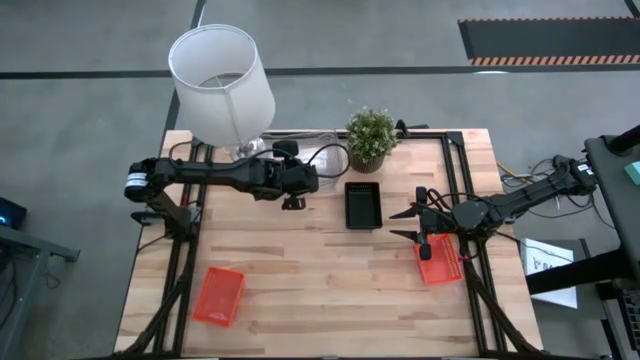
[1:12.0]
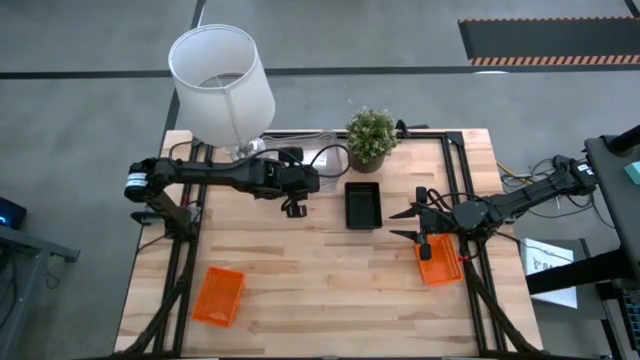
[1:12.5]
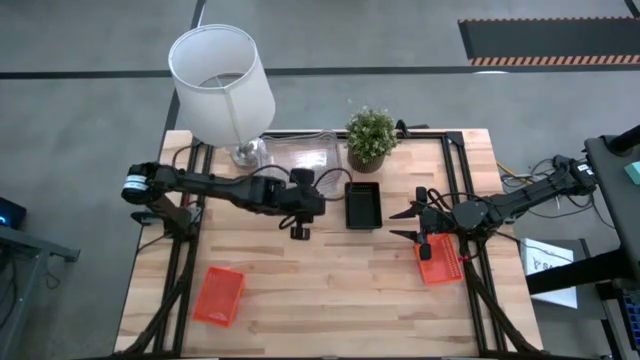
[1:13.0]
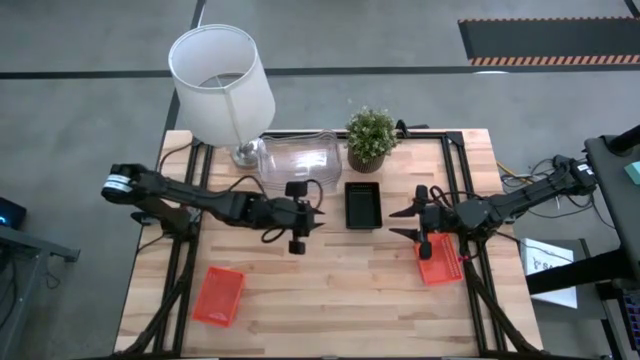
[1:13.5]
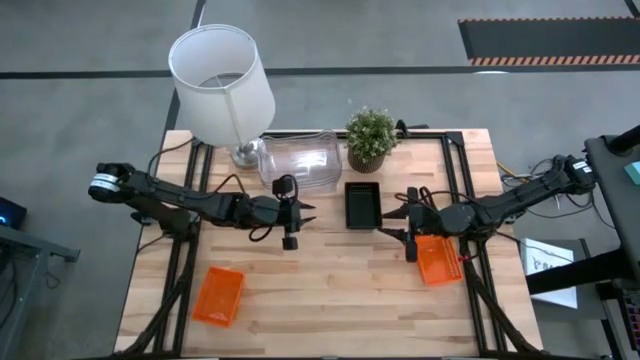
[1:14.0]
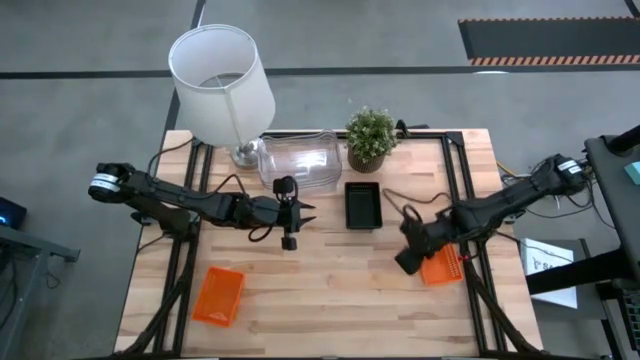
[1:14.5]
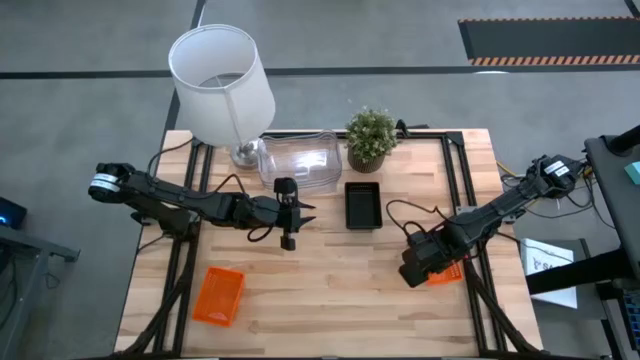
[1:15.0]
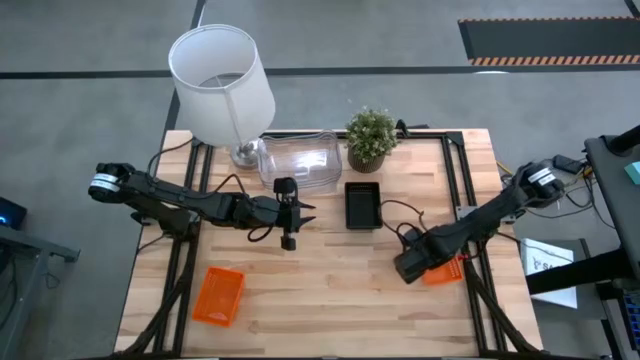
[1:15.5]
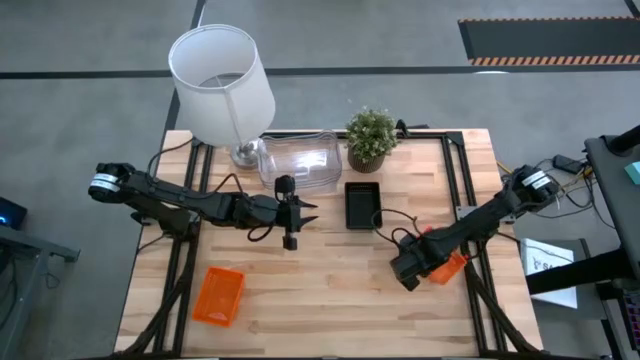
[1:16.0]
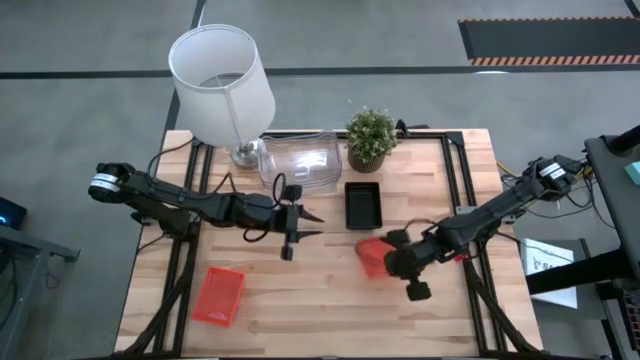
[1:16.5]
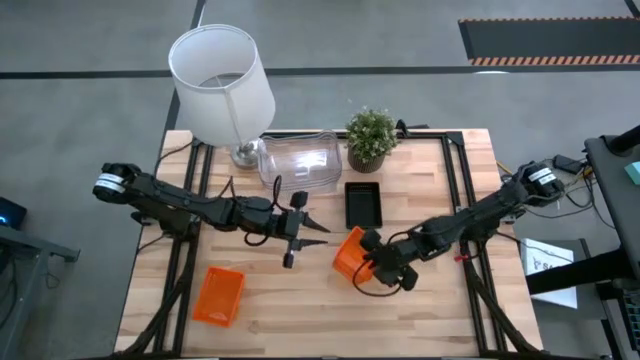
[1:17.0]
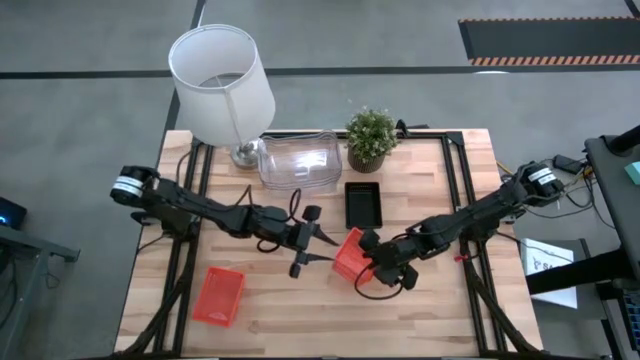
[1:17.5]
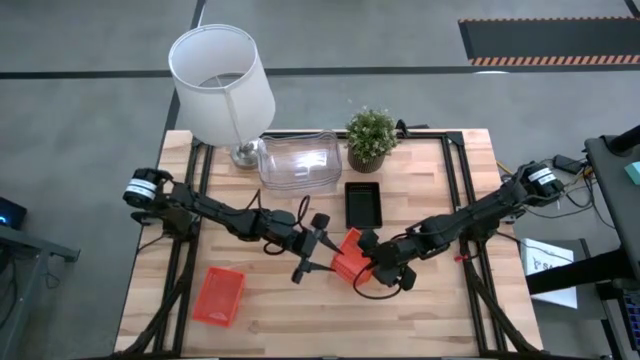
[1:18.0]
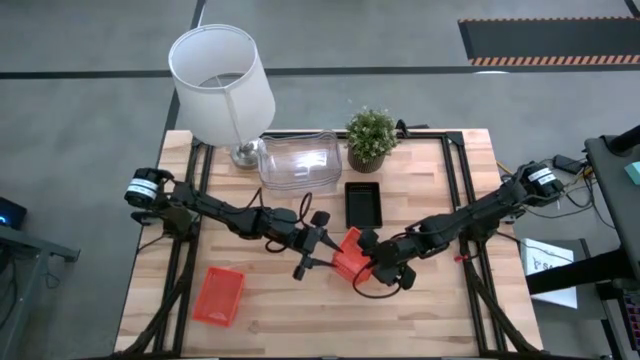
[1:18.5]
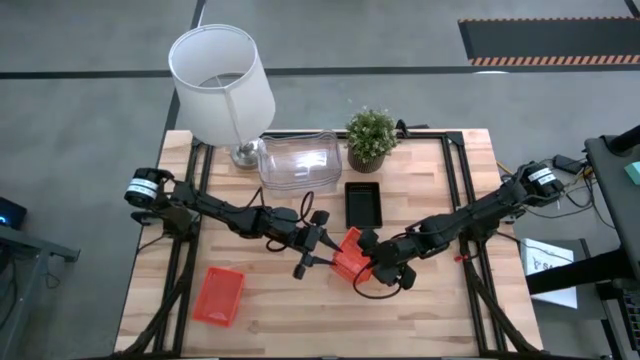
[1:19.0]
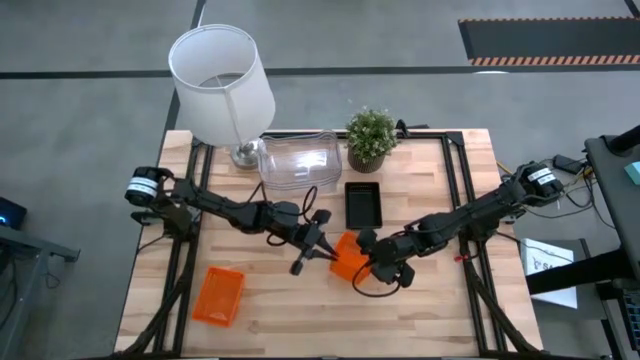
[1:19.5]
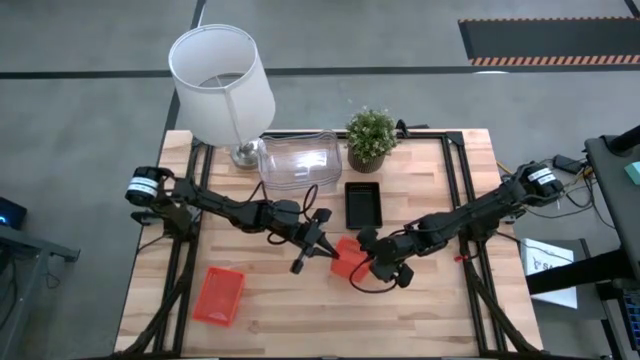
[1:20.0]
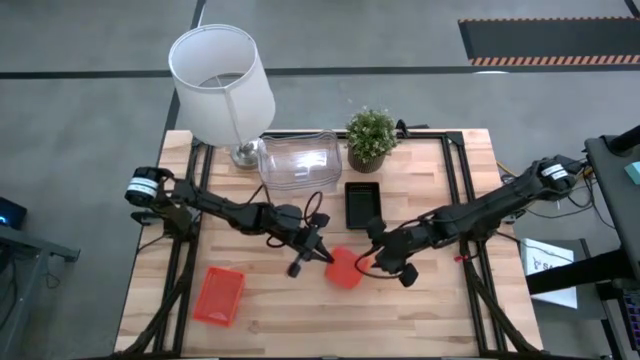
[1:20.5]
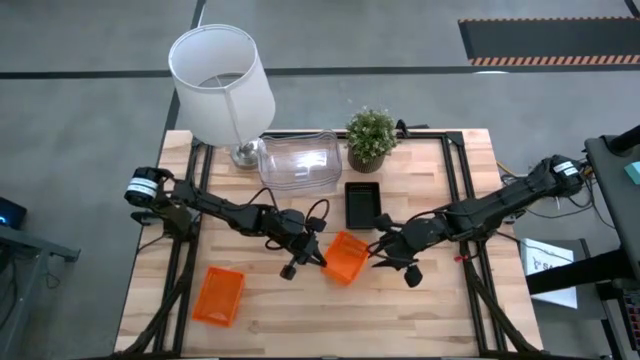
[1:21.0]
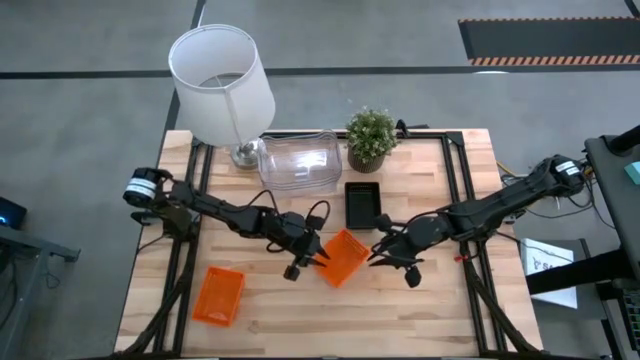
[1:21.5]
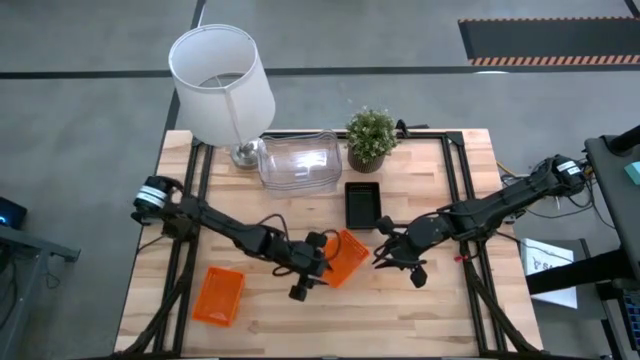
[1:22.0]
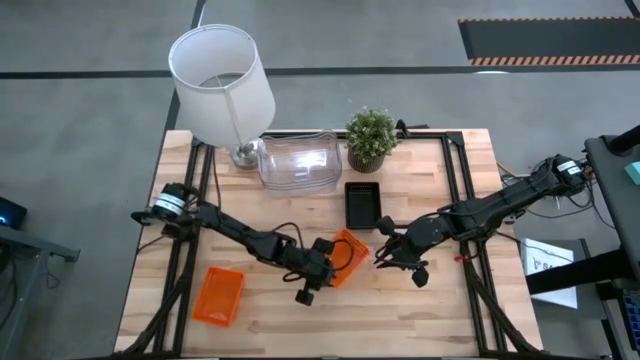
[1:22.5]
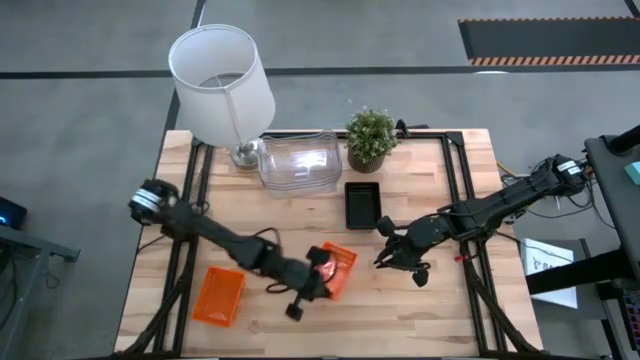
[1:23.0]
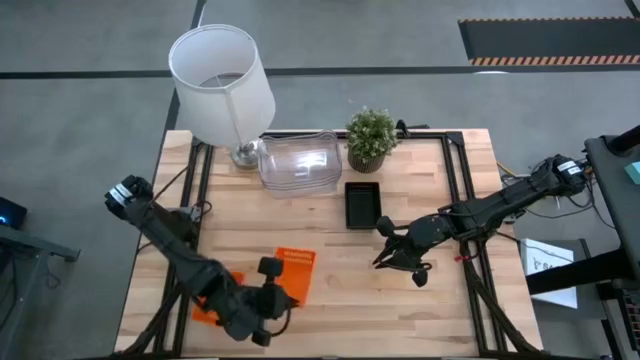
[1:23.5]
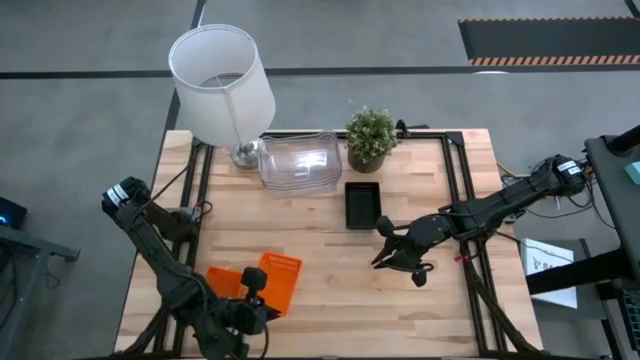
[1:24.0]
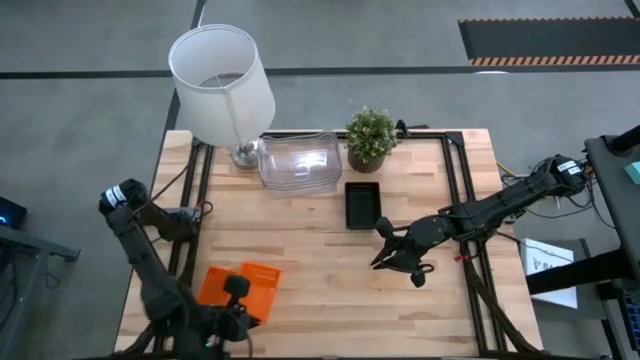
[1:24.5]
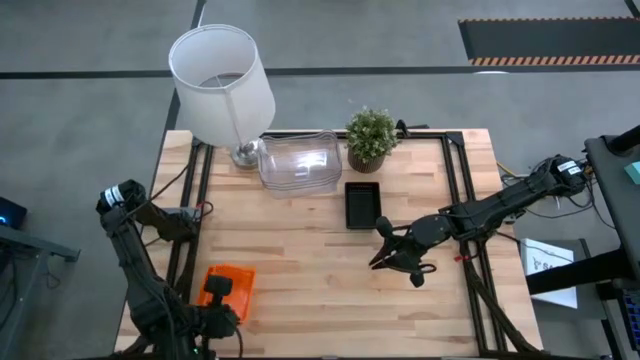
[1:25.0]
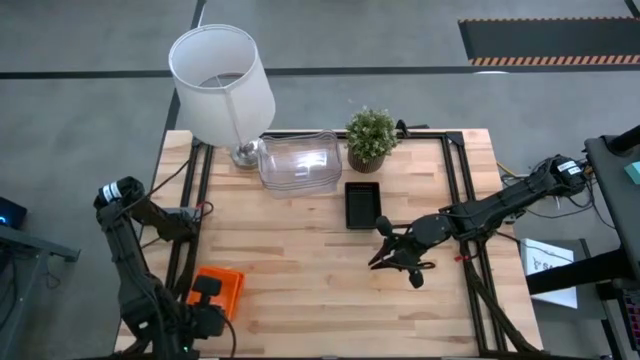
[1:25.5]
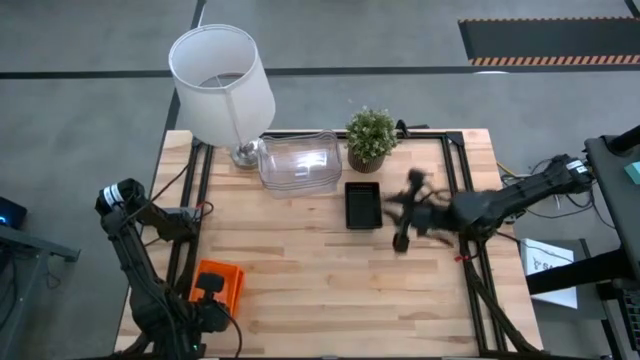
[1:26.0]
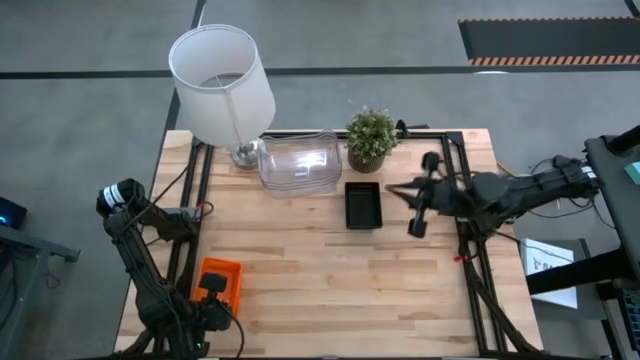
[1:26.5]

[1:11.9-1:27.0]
Stack the top orange bin on the bottom orange bins

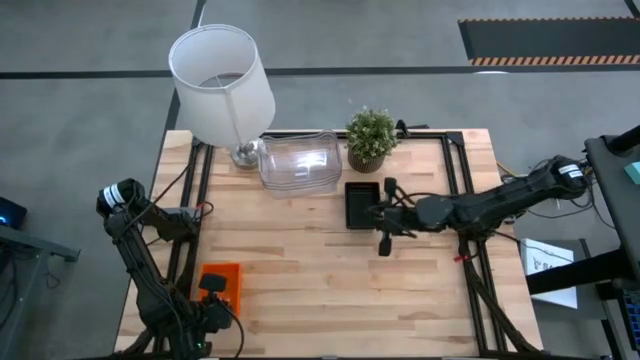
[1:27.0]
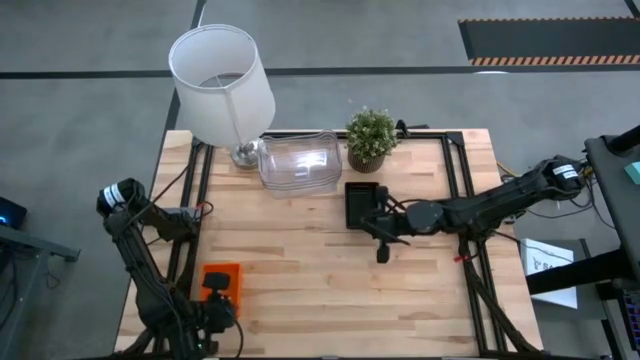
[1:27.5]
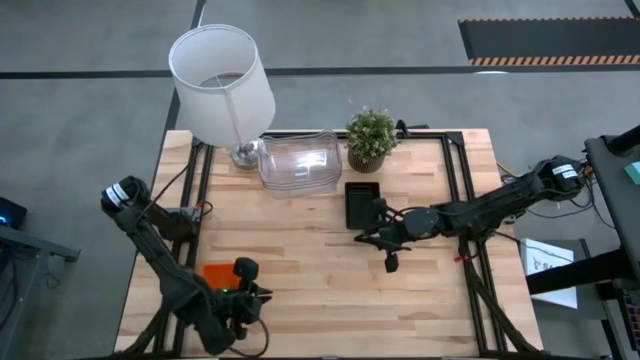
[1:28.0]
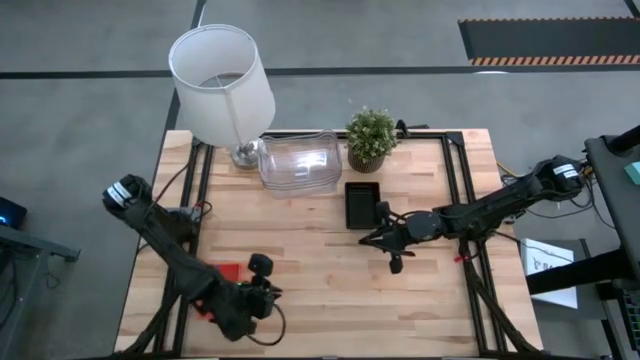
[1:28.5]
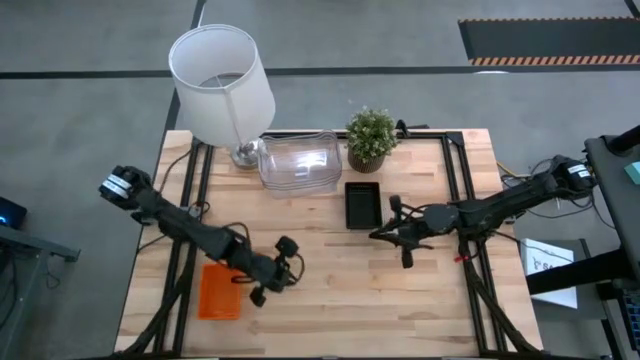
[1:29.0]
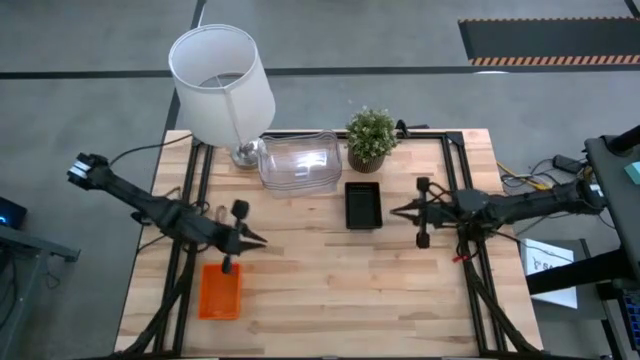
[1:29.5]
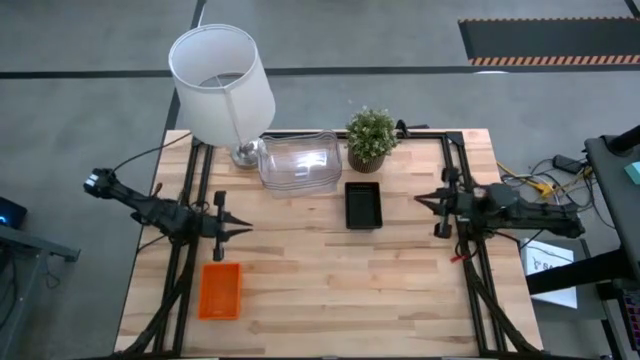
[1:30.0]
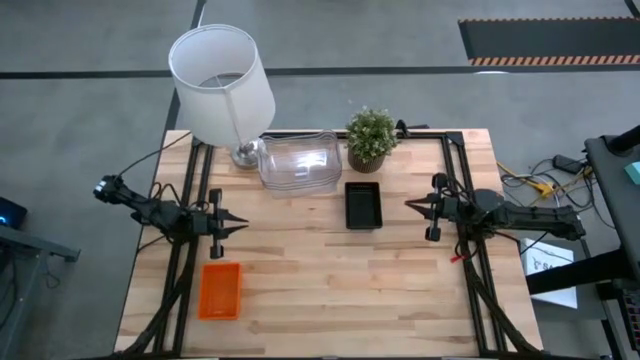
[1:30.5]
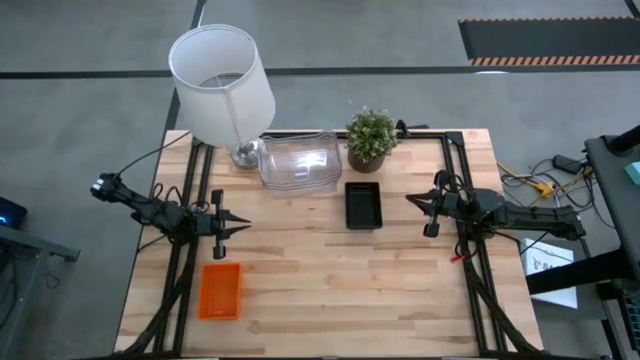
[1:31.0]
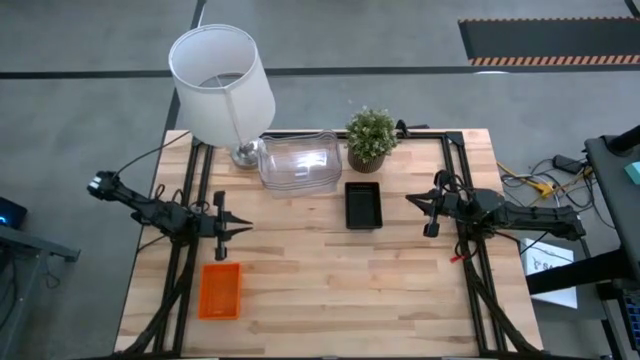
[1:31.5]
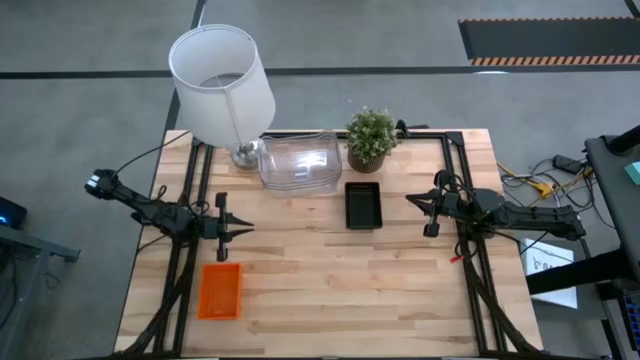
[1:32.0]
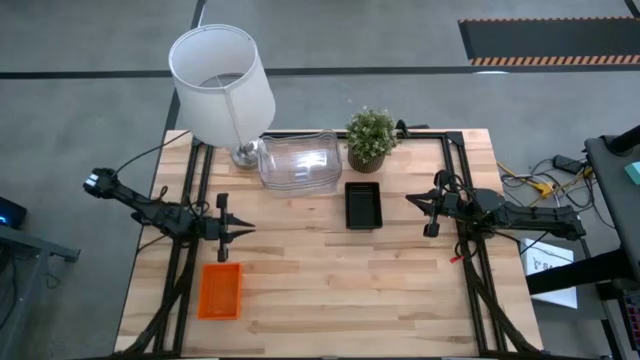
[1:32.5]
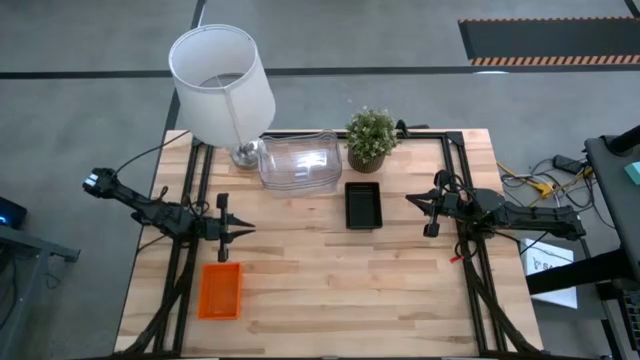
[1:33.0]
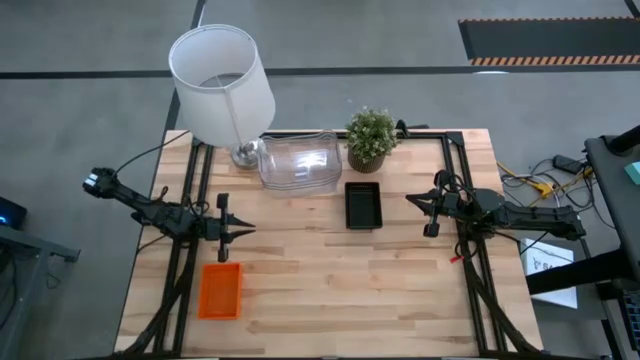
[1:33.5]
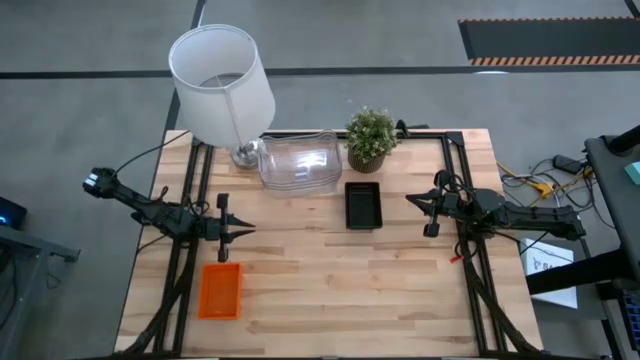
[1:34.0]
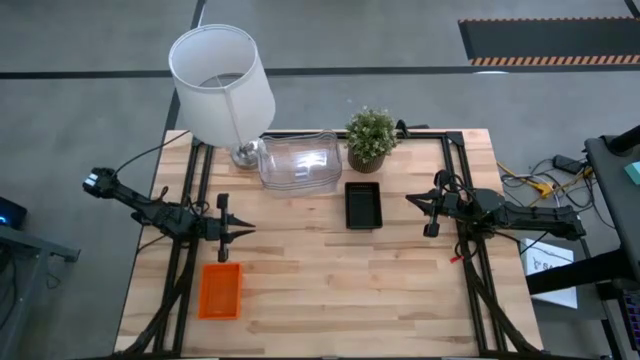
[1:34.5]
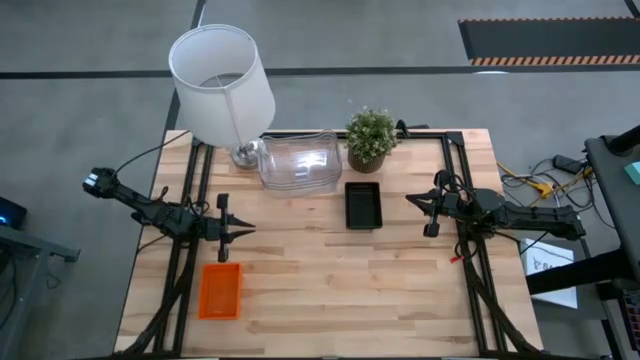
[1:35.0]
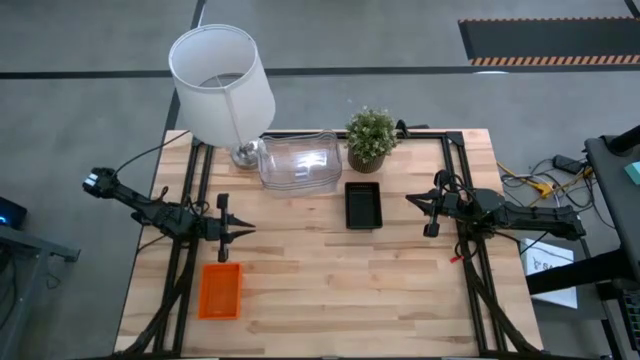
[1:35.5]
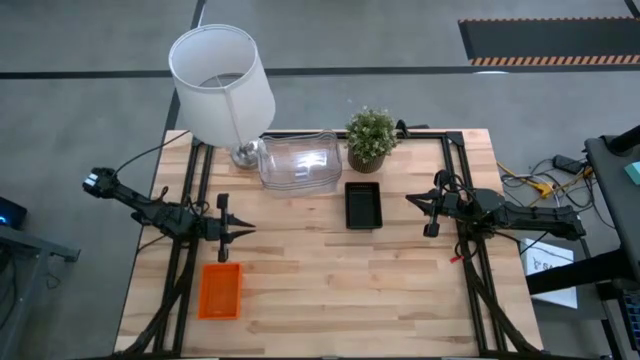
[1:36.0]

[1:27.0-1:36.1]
Return to Home Position
